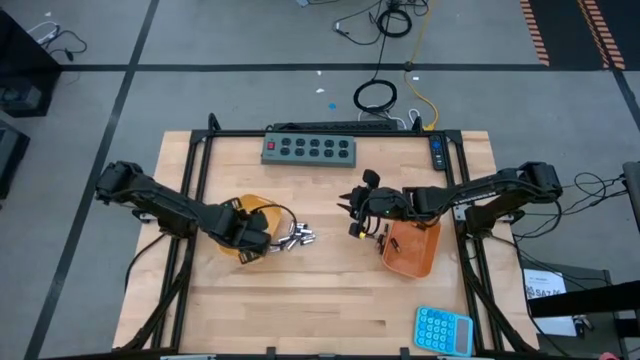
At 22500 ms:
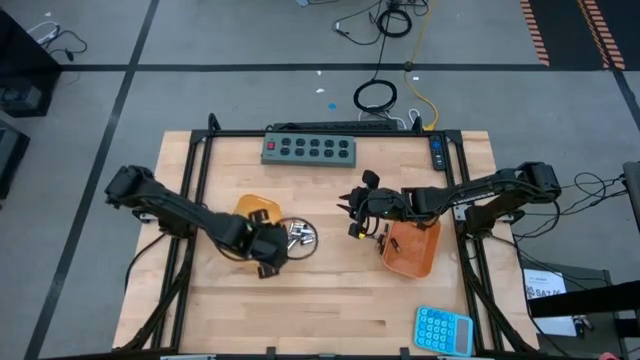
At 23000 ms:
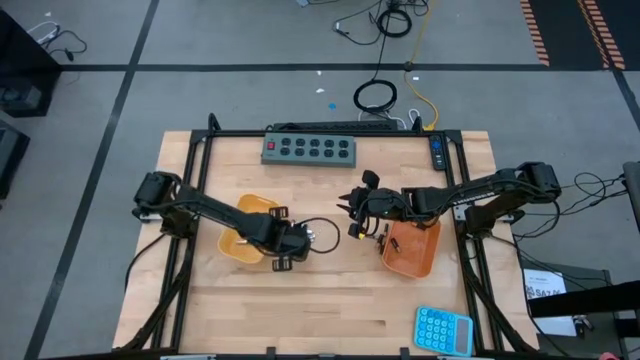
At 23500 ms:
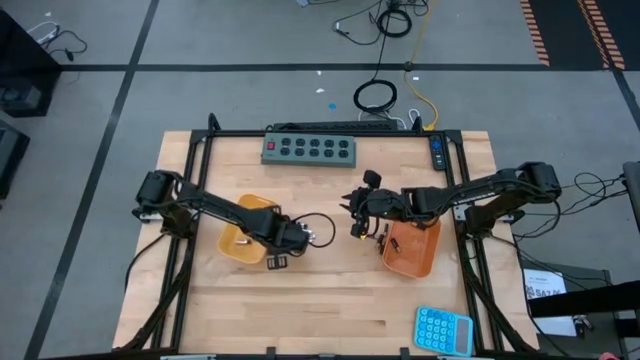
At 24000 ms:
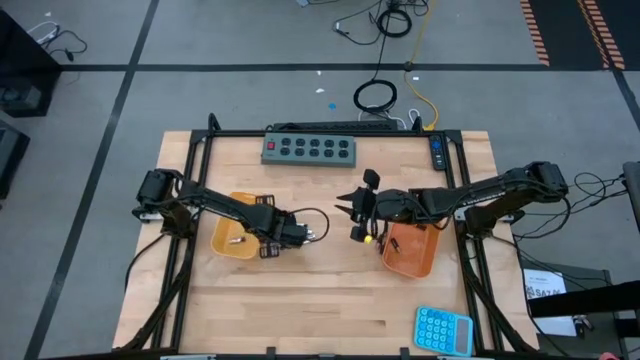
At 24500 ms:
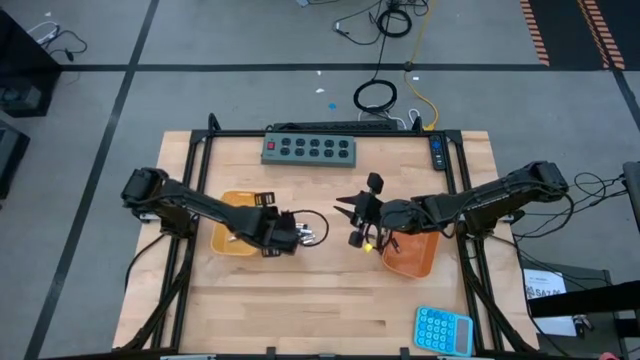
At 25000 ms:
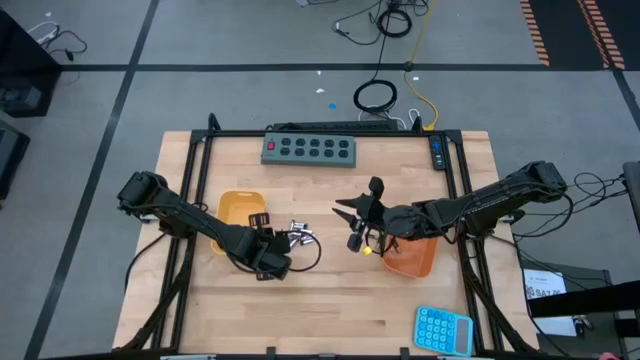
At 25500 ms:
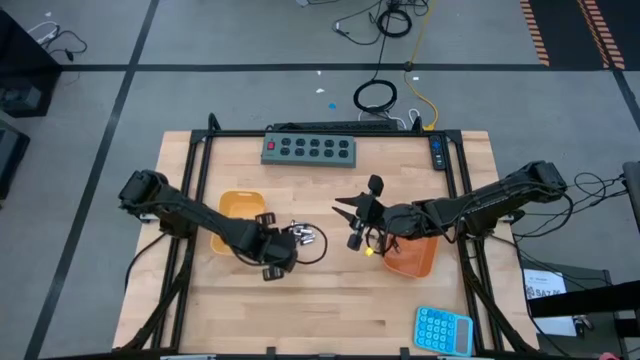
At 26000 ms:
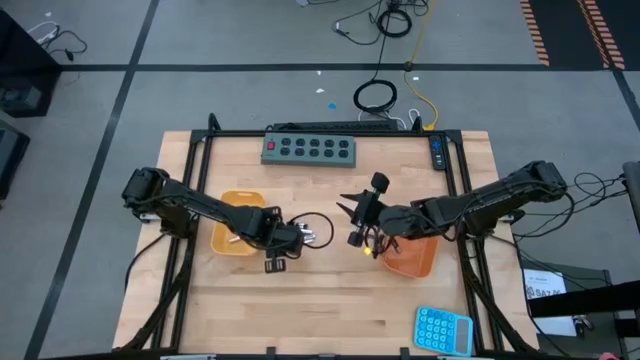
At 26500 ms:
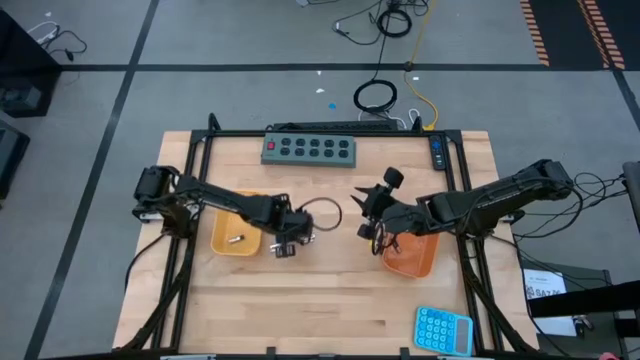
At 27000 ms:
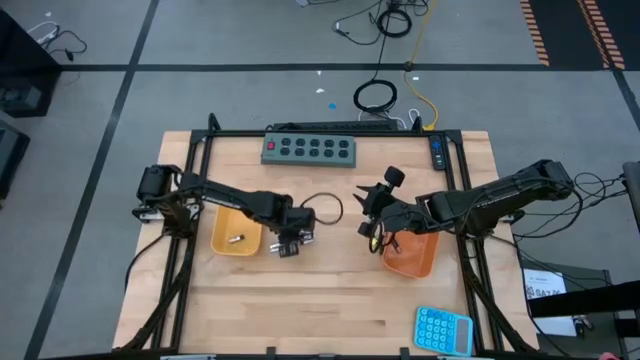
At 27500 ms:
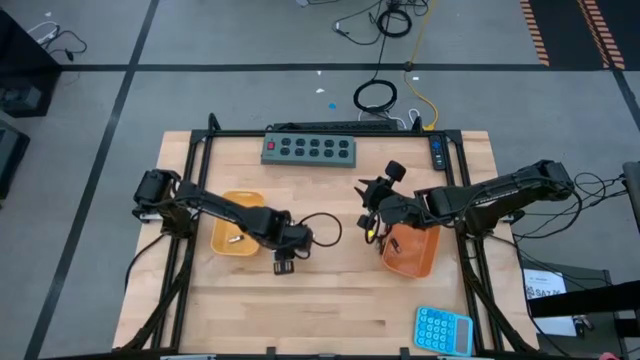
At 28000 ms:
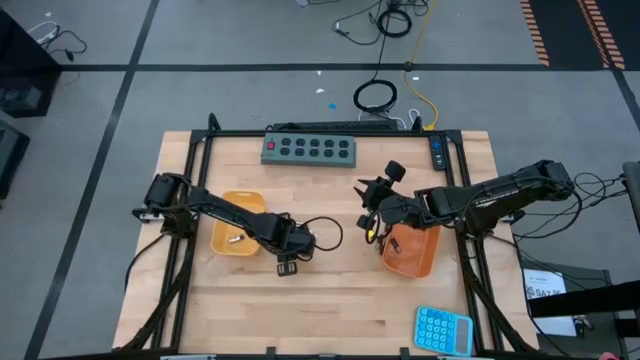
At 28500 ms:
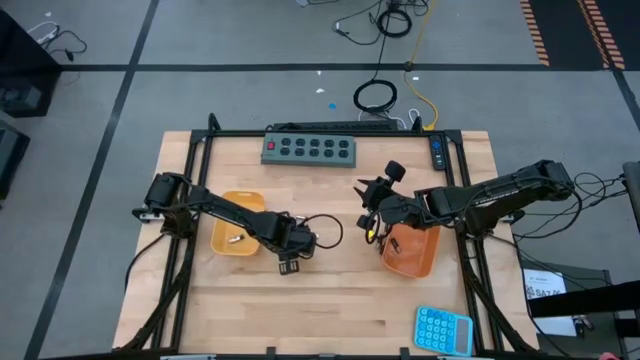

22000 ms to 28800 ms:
Task: Sort batteries
Put the silver battery into the yellow bin

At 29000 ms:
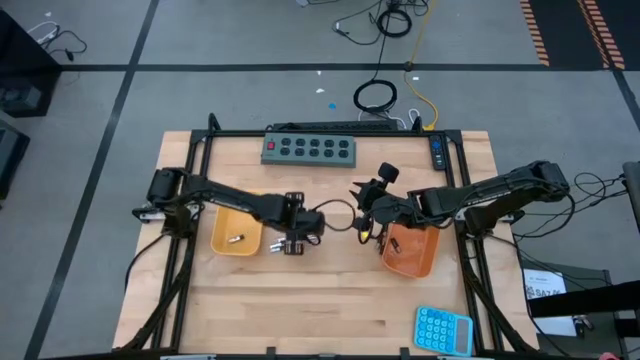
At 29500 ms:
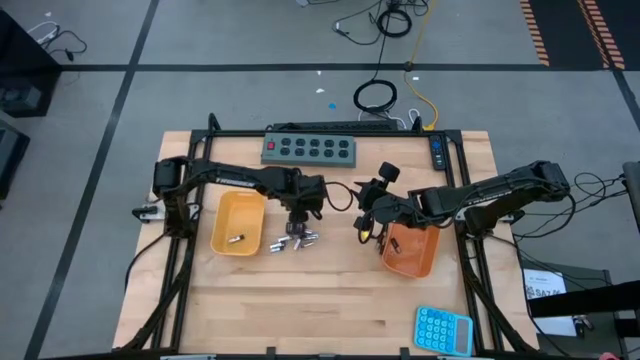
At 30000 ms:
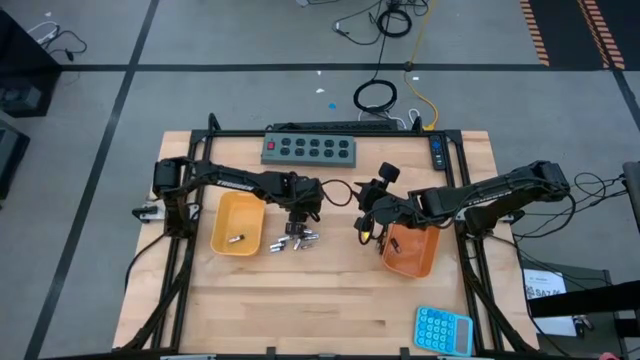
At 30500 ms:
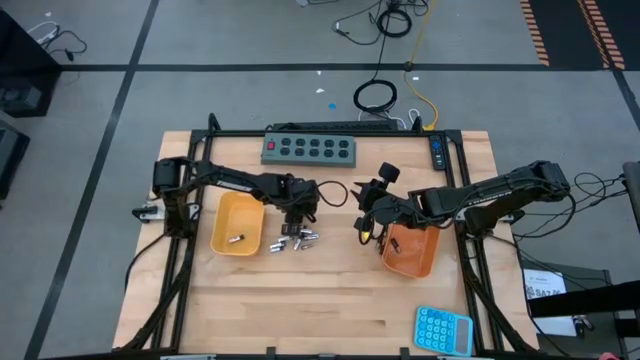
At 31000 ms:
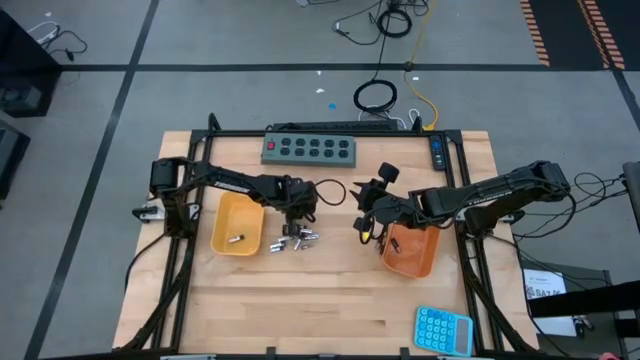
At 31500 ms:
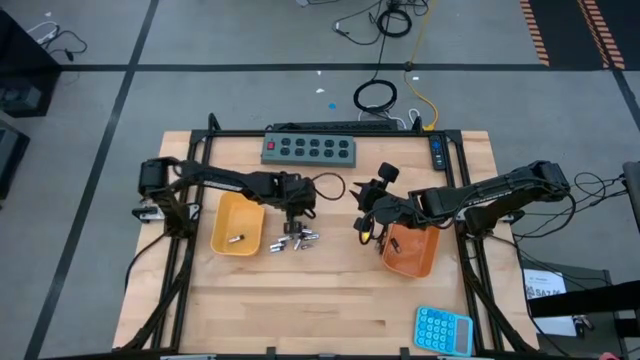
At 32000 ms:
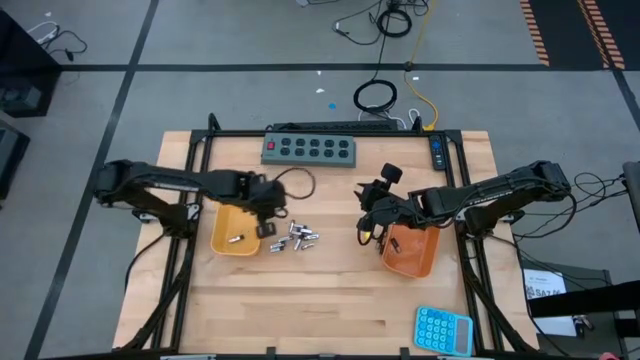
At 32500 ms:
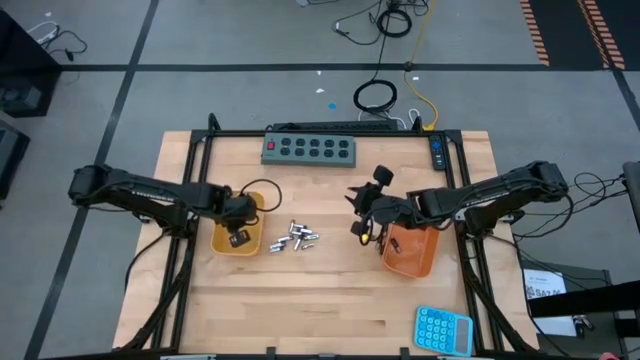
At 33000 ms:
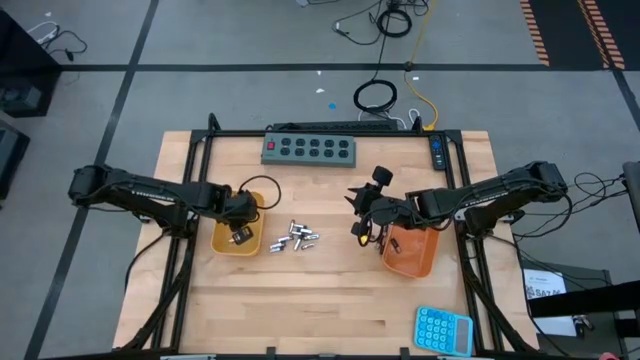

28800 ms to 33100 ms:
Put the silver battery into the yellow bin

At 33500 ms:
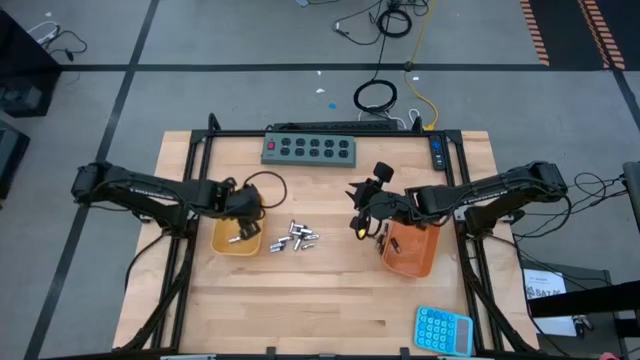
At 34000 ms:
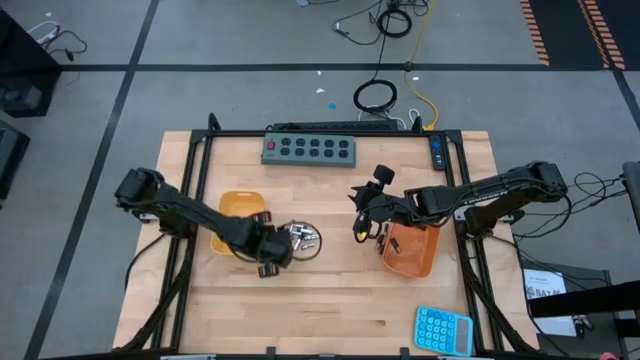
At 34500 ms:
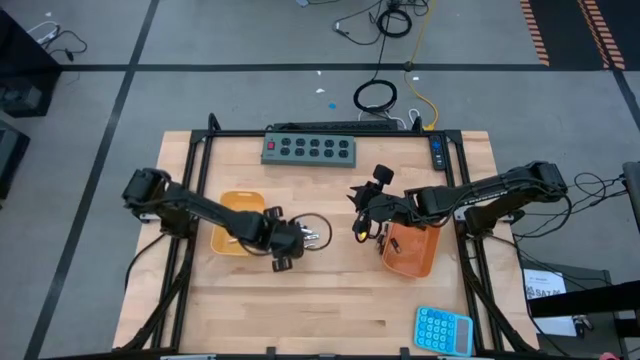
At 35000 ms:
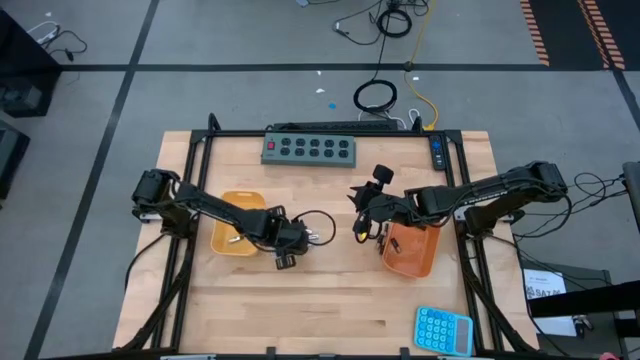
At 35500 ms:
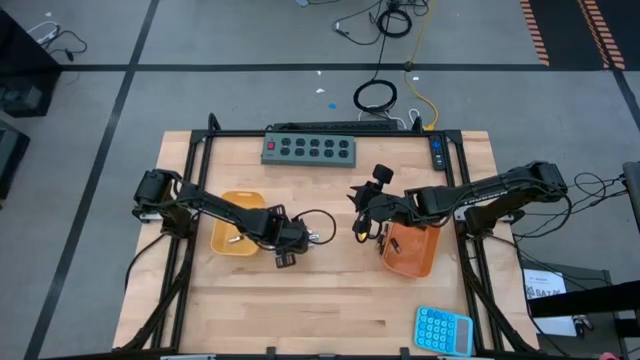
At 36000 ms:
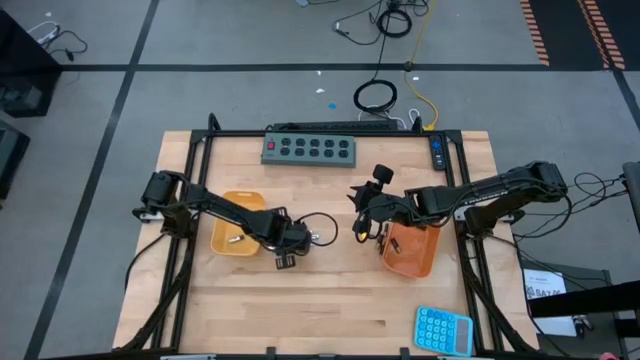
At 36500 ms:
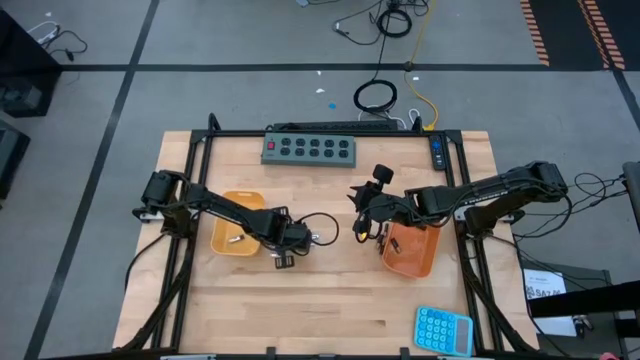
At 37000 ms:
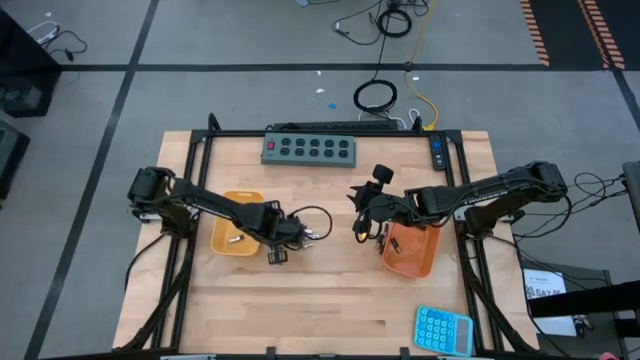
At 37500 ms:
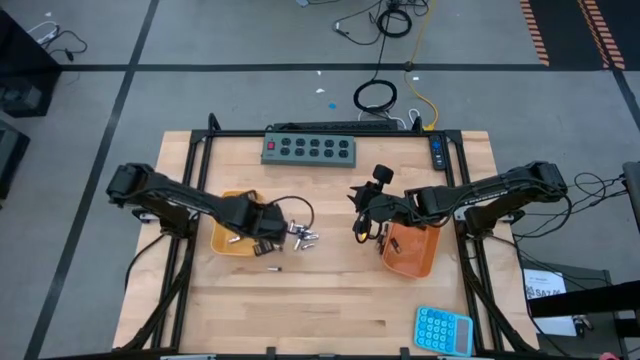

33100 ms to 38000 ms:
Put the silver battery into the yellow bin

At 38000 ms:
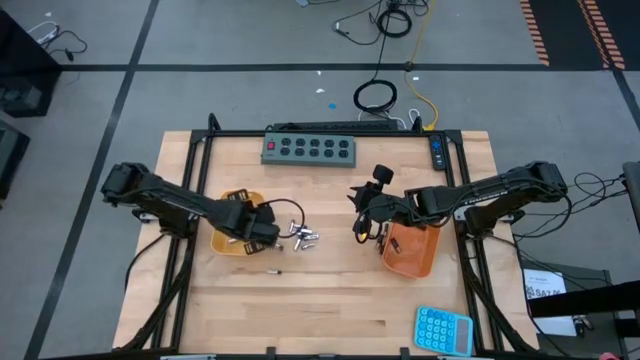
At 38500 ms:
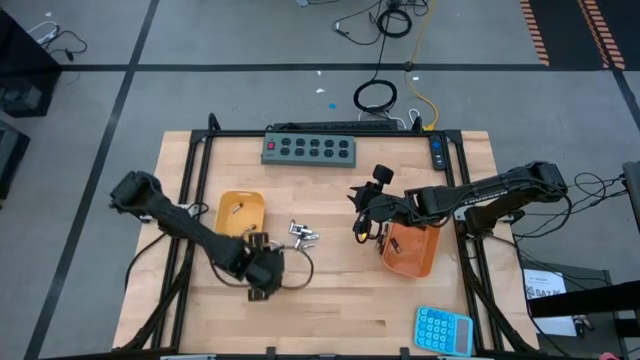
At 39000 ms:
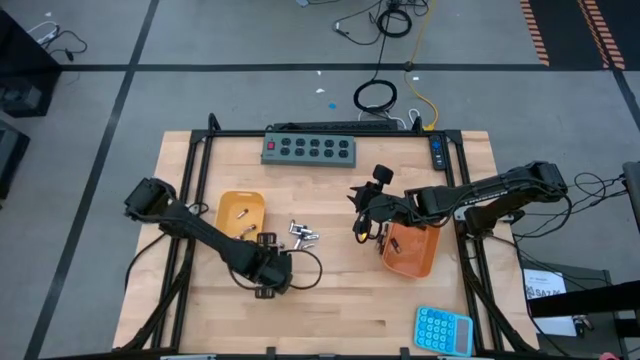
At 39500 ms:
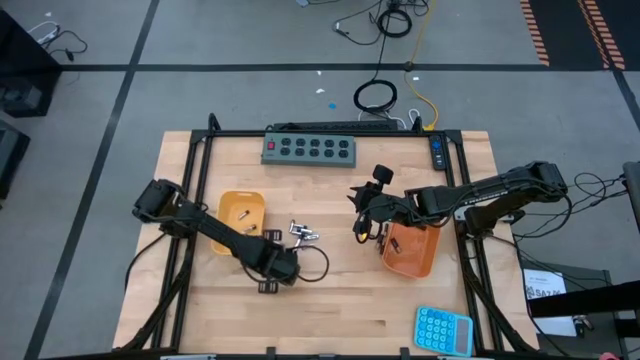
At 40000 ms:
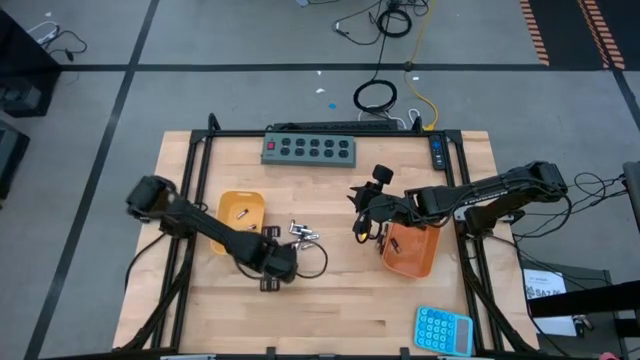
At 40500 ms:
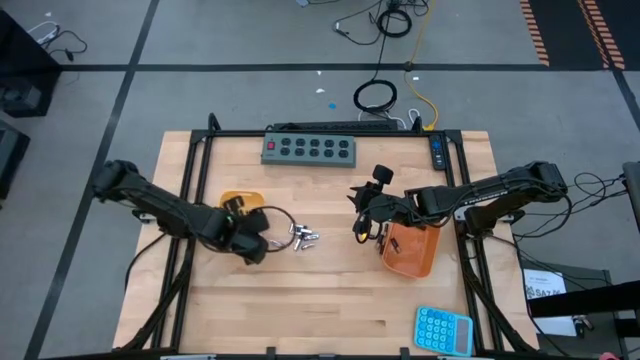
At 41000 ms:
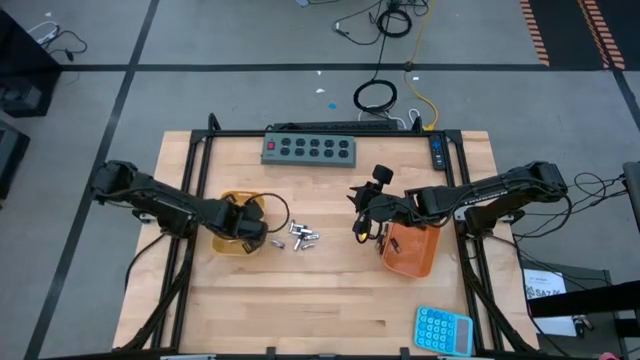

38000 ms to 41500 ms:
Put the silver battery into the yellow bin

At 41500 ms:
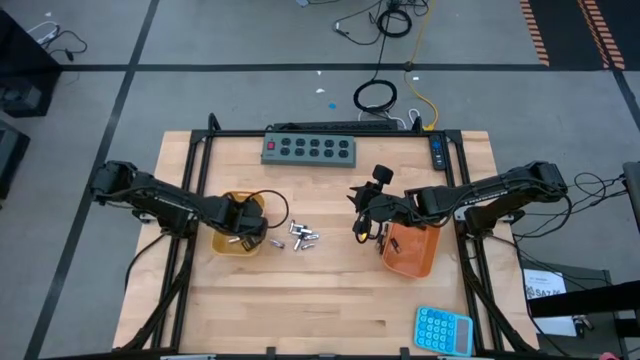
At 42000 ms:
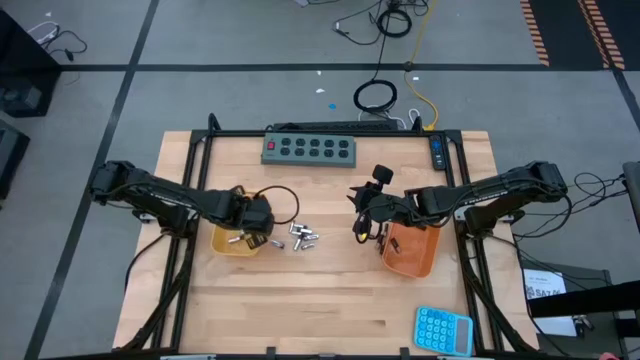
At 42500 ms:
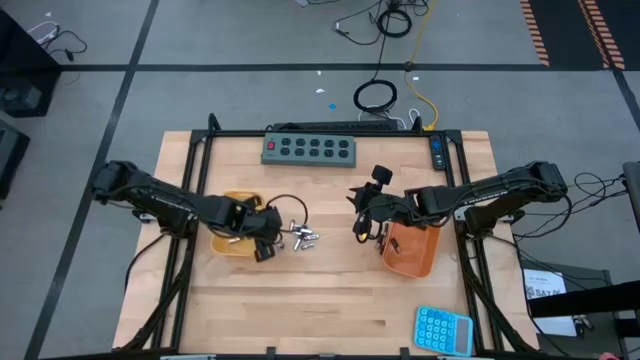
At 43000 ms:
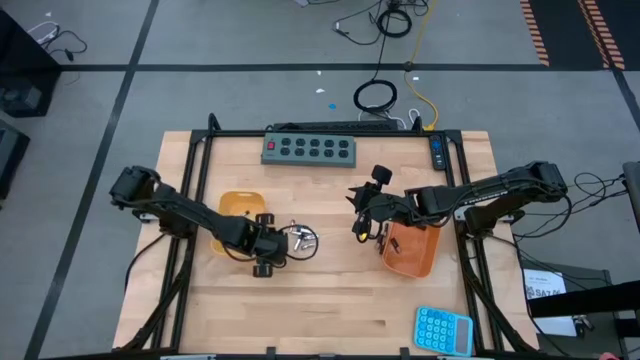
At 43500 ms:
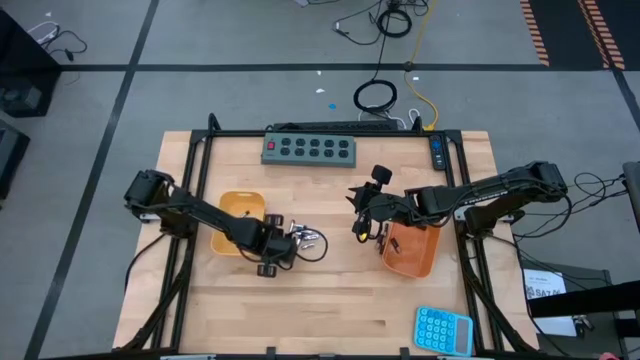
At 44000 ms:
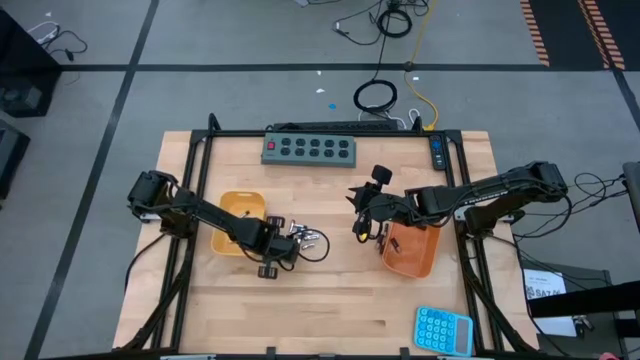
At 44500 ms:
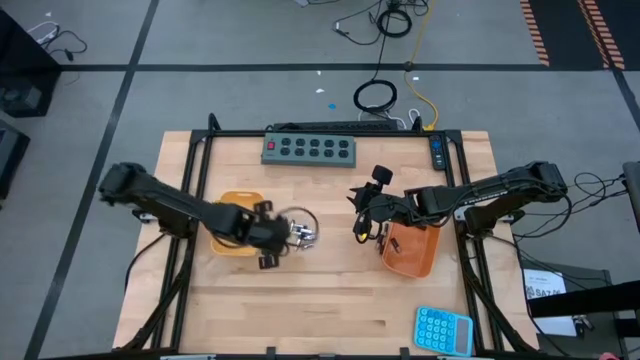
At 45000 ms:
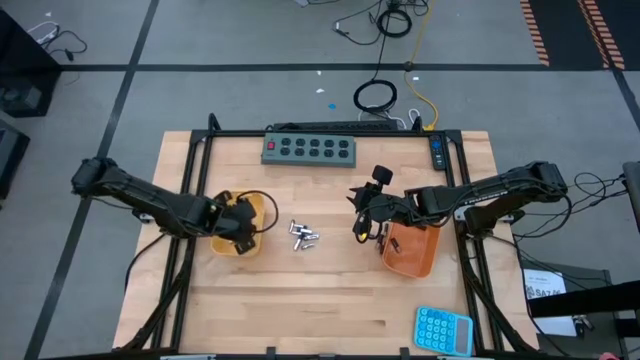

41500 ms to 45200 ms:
Put the silver battery into the yellow bin
